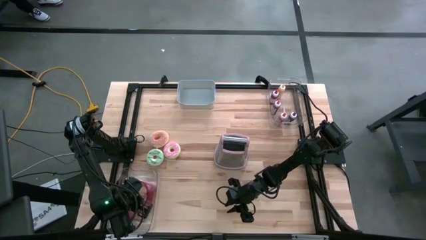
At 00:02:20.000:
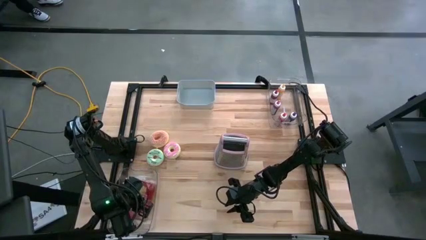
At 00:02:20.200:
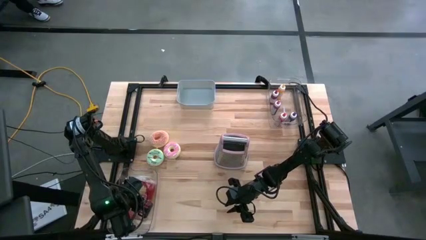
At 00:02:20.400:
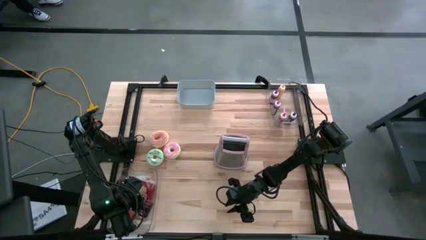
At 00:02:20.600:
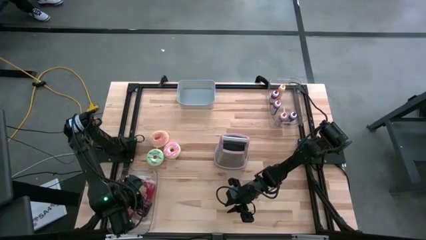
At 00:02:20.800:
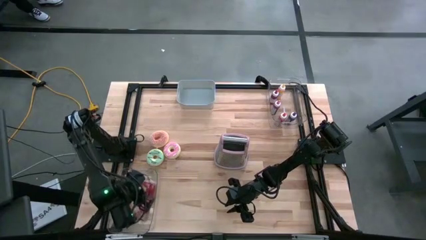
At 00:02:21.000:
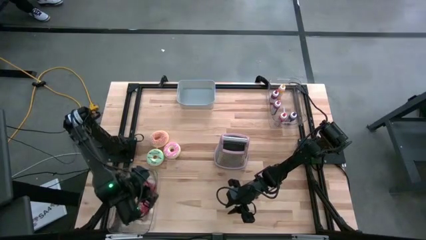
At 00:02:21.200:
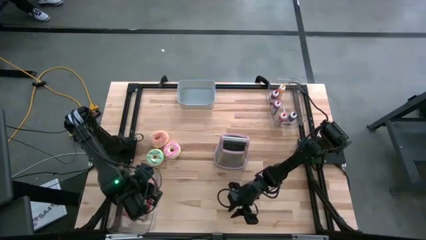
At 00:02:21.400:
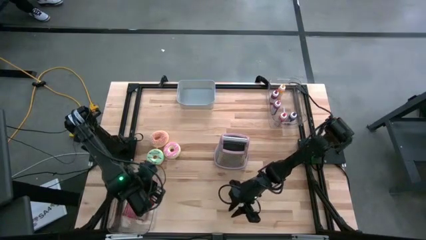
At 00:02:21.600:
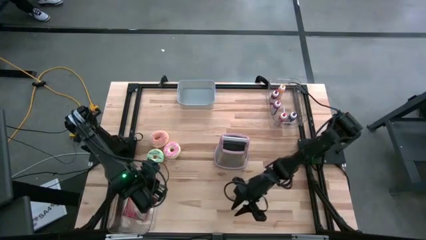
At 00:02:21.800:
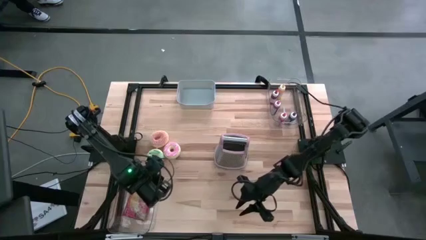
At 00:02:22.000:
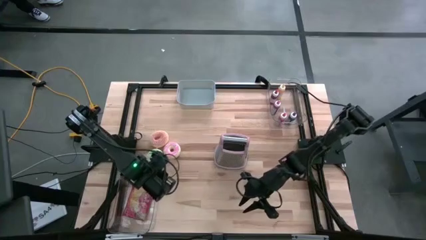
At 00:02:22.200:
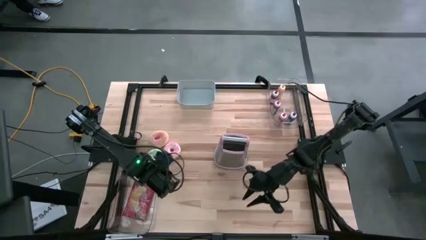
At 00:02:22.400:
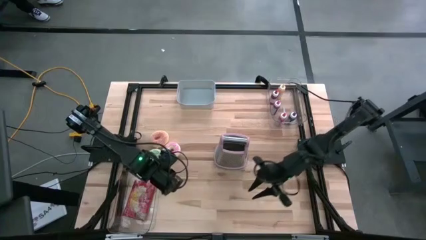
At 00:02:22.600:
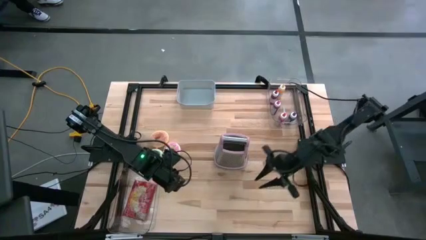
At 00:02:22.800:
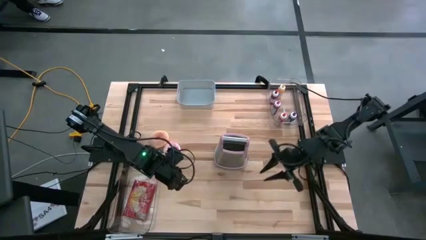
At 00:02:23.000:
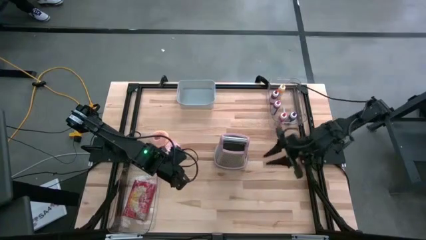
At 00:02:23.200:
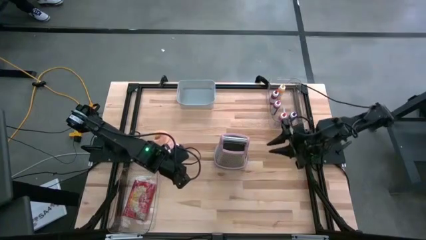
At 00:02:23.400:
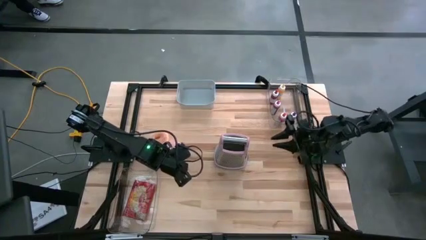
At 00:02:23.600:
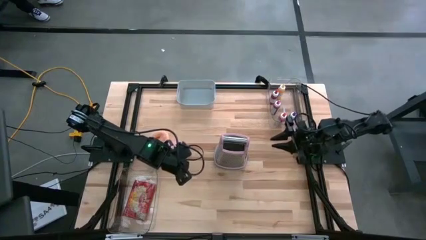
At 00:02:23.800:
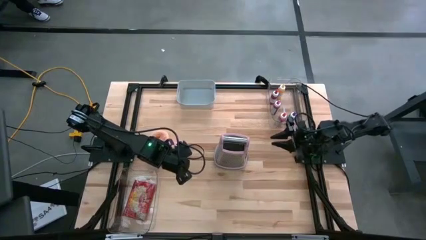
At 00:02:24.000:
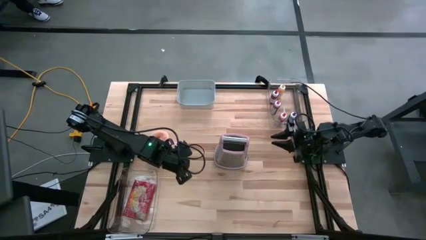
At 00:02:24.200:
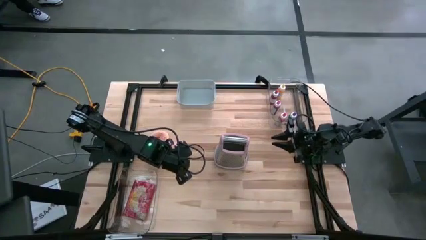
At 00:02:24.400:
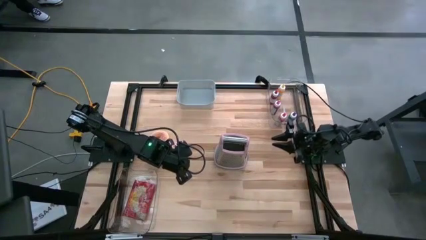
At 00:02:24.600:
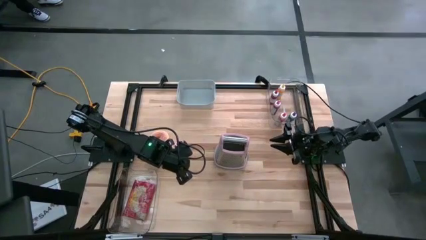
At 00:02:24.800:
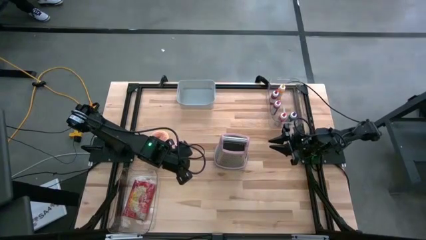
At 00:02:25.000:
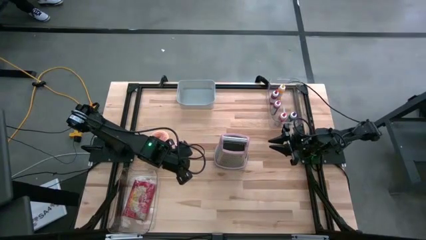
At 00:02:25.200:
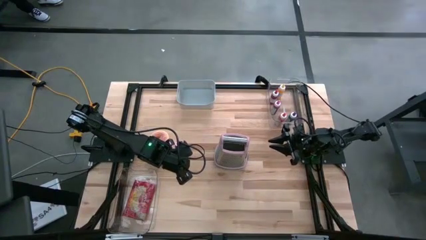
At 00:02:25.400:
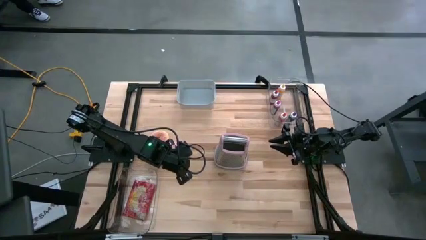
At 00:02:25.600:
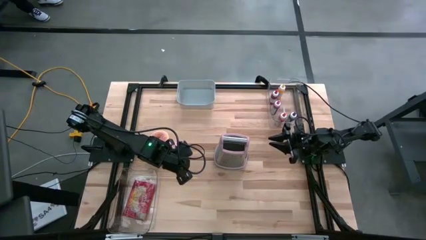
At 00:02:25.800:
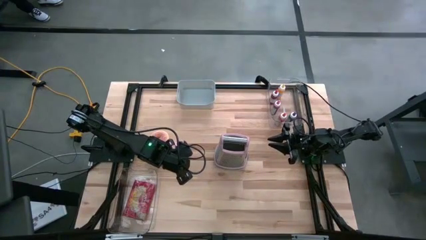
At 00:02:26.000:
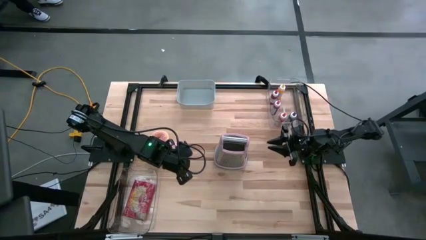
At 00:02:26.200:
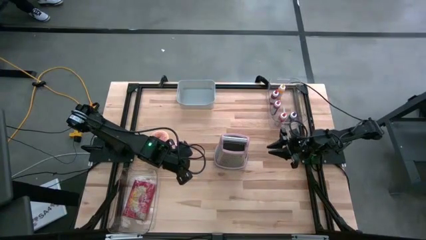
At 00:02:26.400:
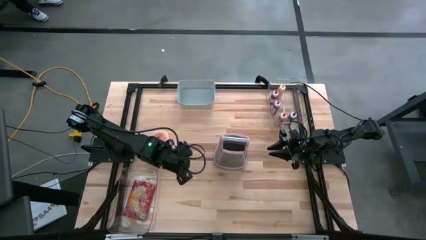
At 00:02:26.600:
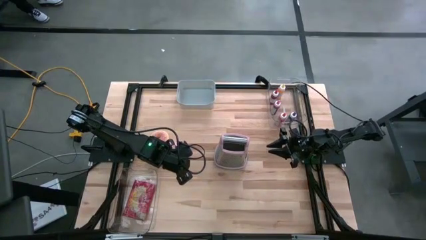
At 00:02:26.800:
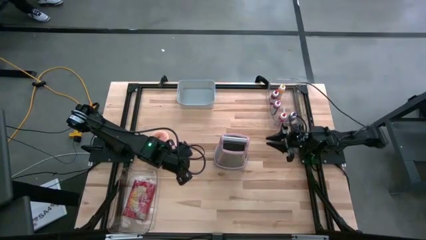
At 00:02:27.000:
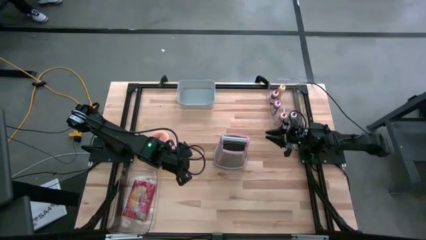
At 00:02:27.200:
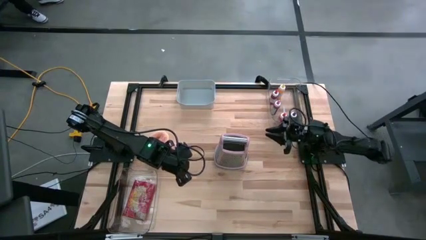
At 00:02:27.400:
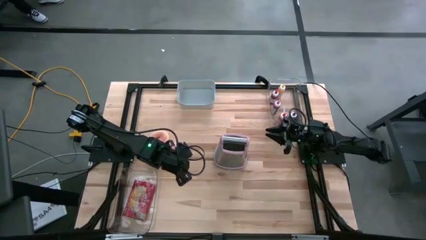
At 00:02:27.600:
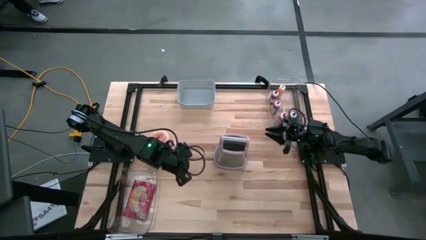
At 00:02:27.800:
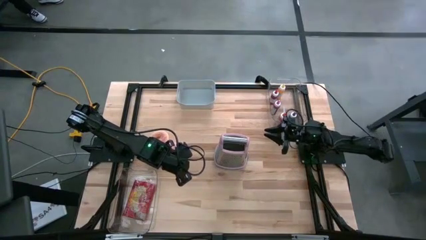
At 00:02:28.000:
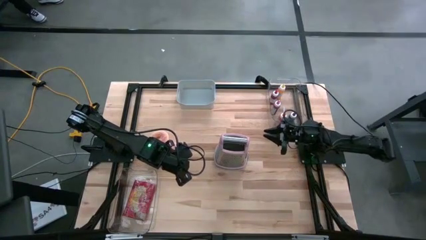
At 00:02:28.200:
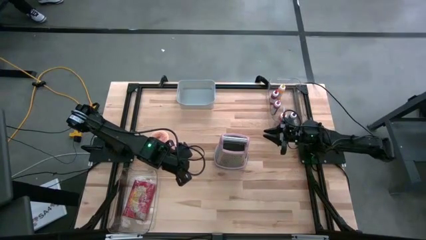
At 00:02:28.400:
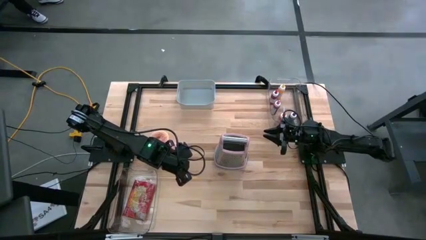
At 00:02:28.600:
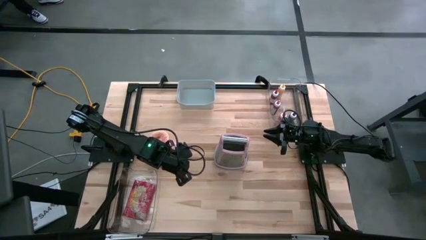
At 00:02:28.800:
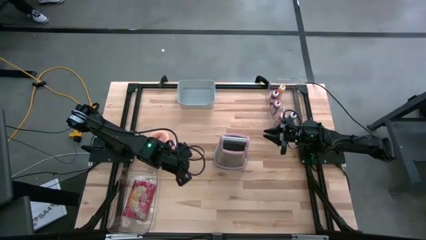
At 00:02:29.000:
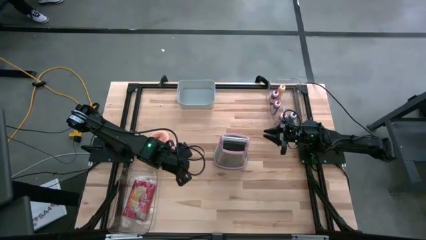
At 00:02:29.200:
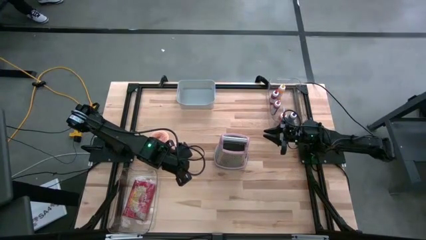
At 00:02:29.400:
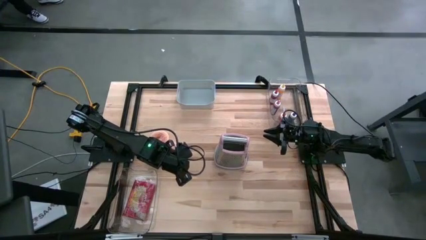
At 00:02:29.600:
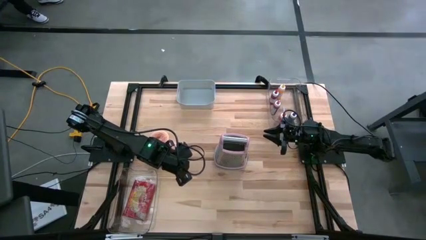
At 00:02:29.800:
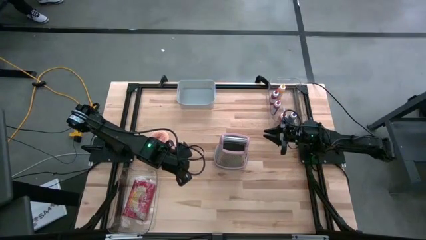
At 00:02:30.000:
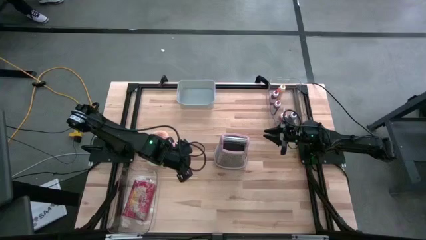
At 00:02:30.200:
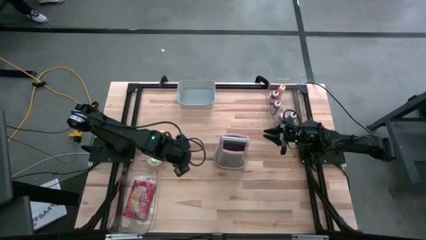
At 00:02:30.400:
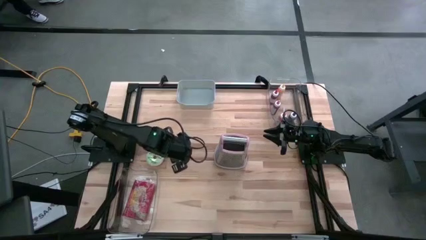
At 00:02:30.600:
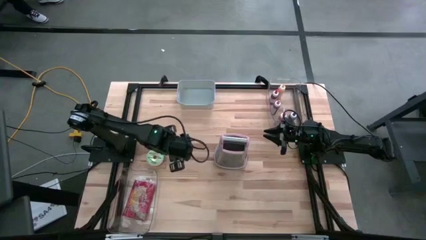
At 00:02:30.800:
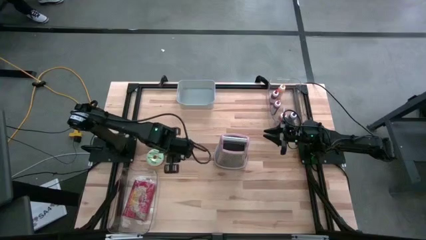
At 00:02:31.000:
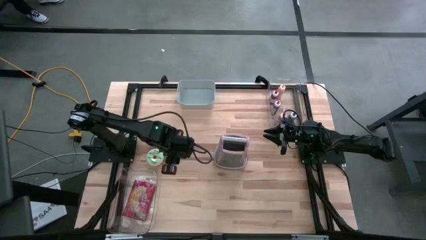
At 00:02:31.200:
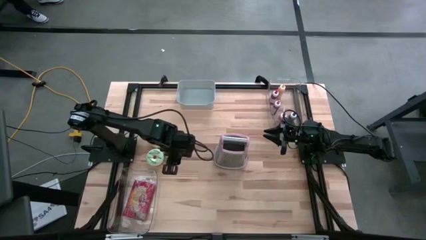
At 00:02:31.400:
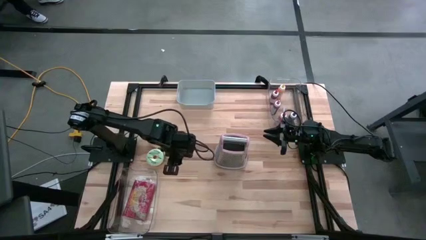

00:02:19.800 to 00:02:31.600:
Put the pink donut into the gray bin
